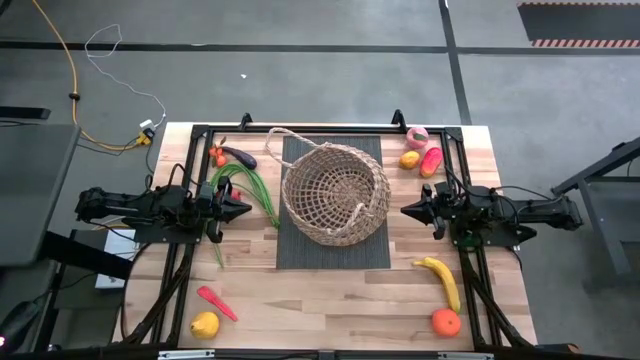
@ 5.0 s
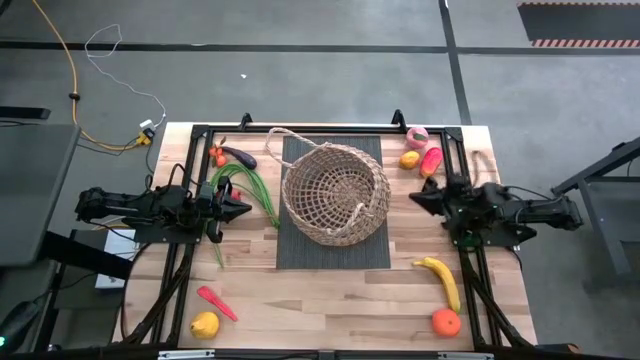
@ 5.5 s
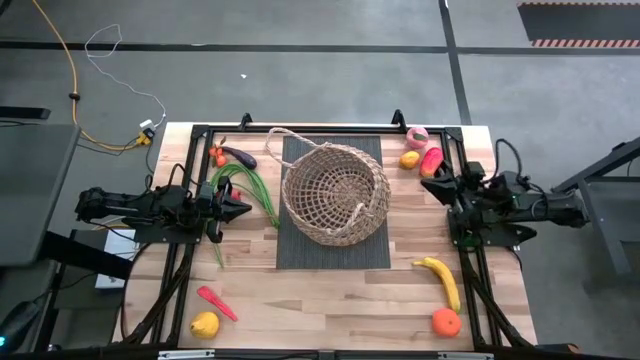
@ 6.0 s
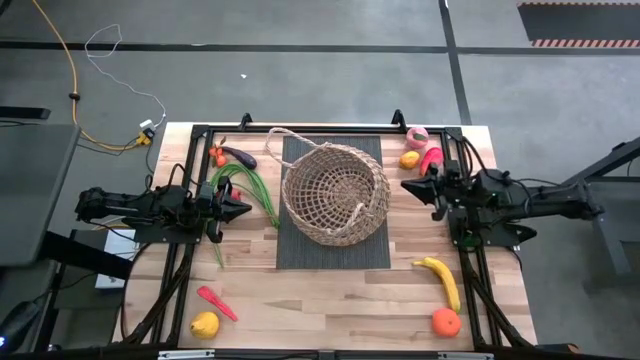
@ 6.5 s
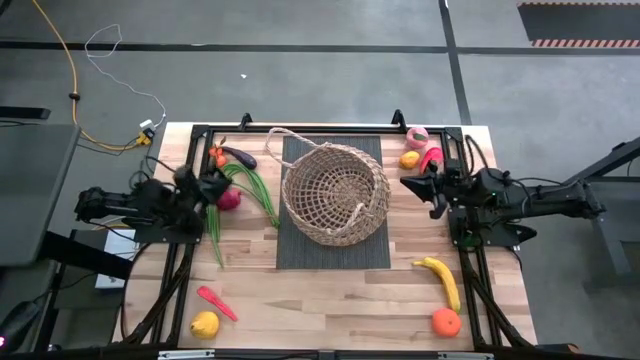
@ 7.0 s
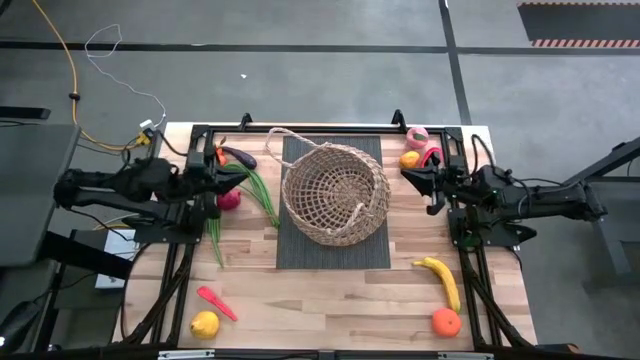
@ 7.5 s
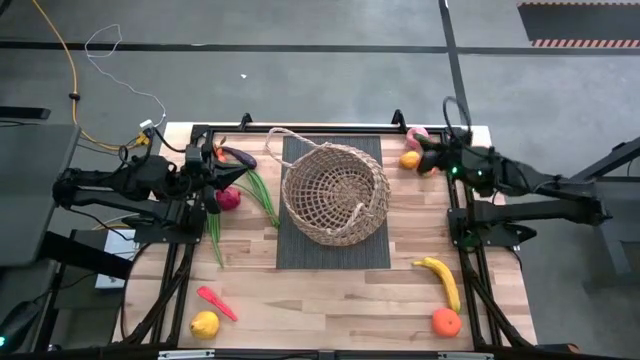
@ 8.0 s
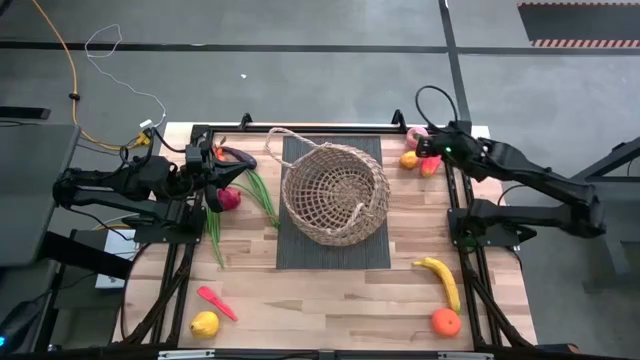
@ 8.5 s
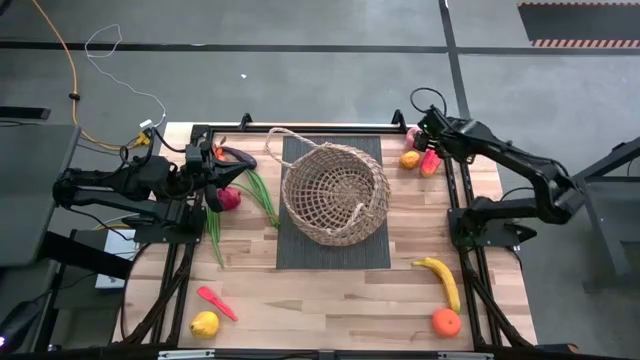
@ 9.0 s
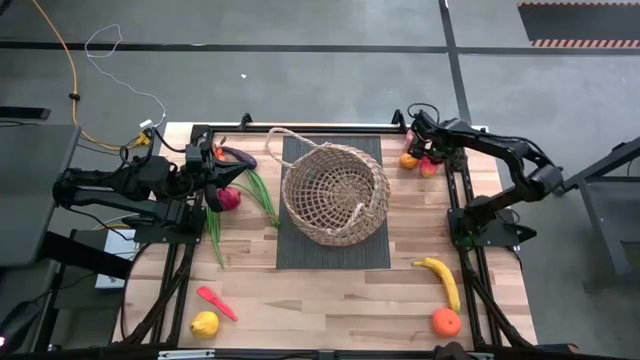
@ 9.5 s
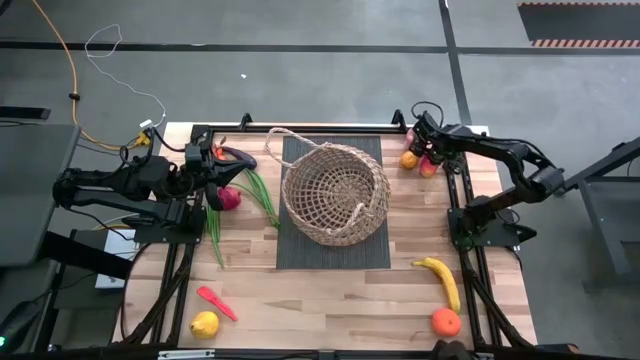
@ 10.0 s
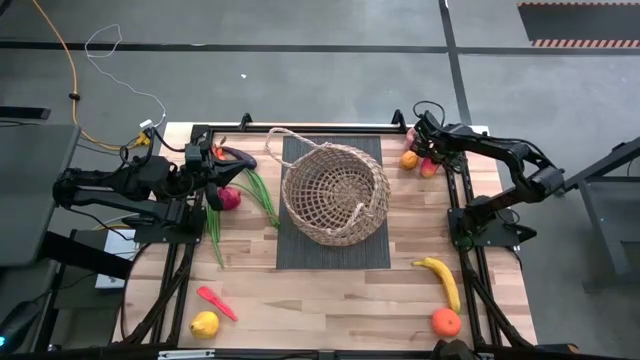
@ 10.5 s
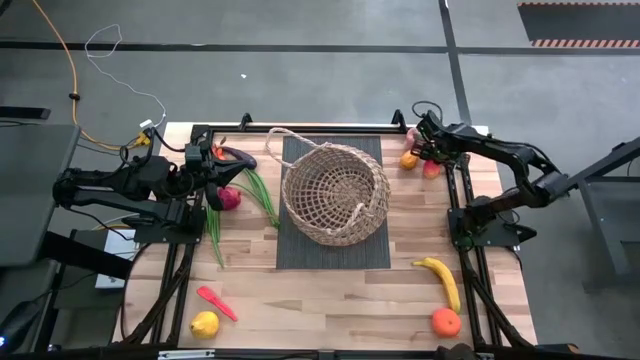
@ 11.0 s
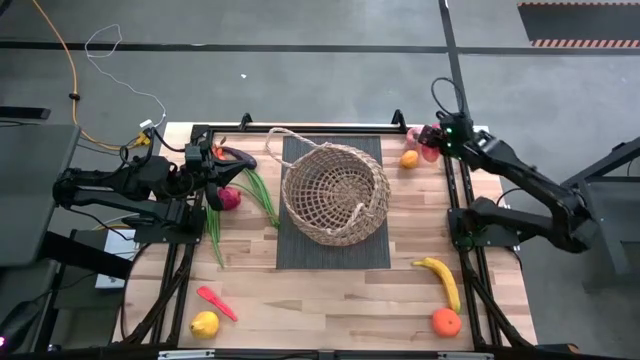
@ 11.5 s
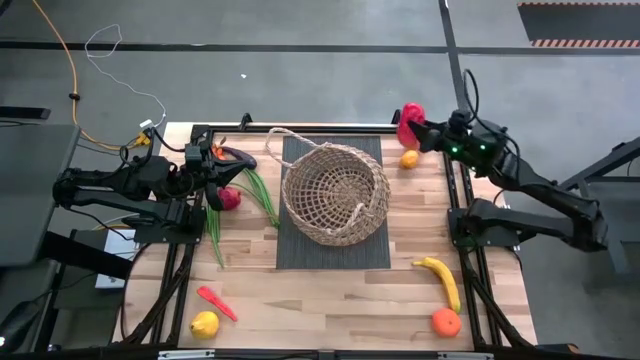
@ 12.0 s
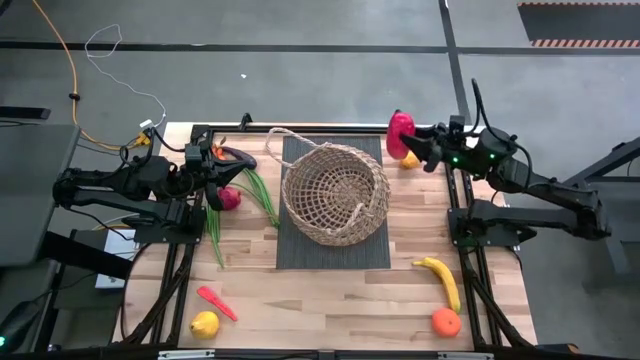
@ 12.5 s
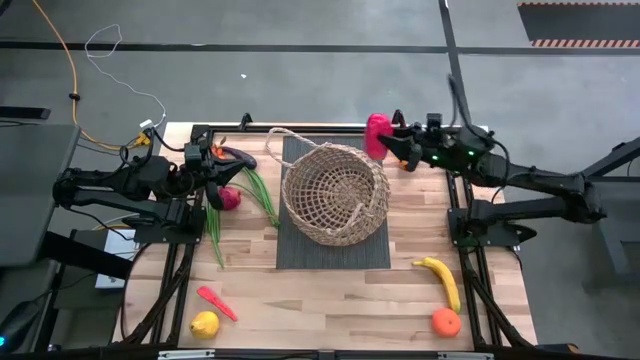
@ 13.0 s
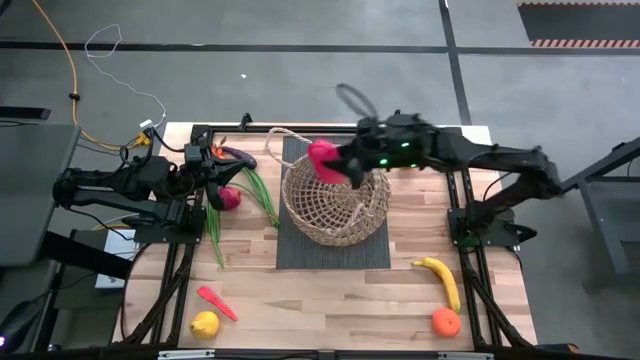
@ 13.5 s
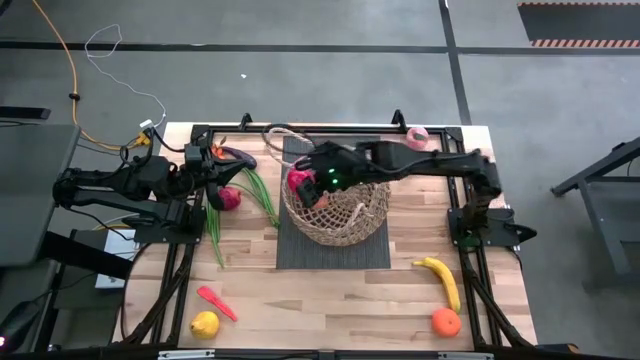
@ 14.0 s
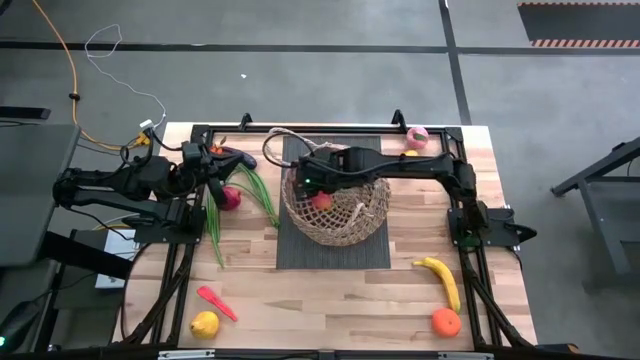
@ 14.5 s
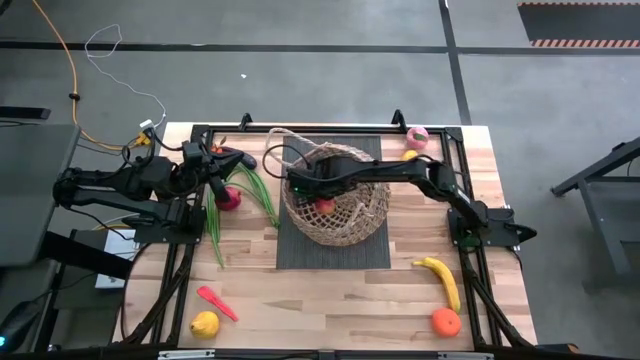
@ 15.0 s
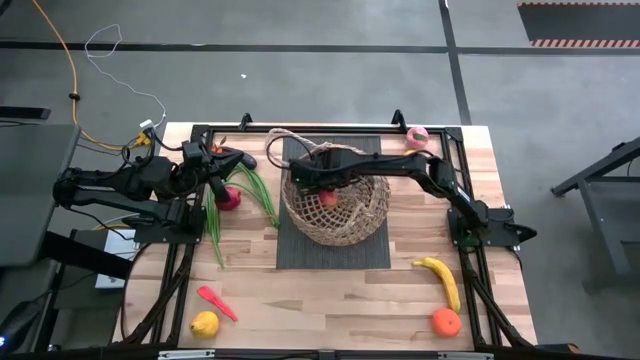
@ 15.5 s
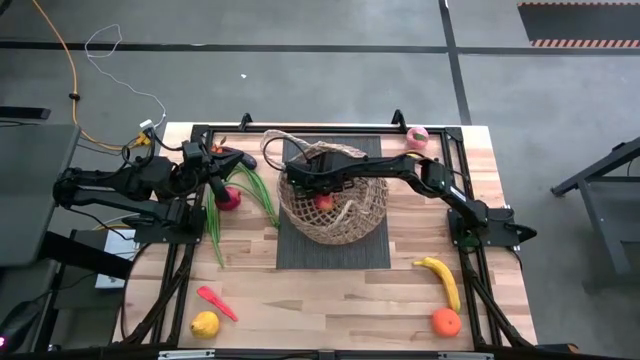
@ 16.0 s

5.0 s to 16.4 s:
Task: Build produce basket
Put the mango into the woven basket

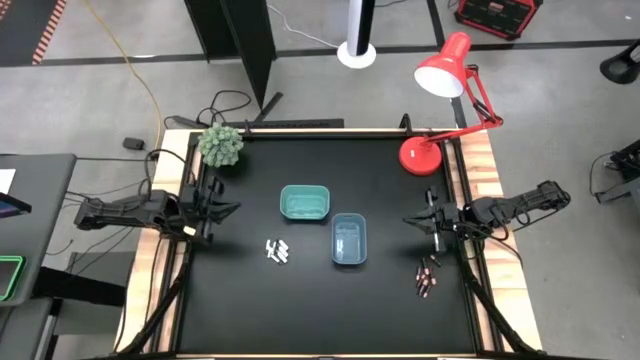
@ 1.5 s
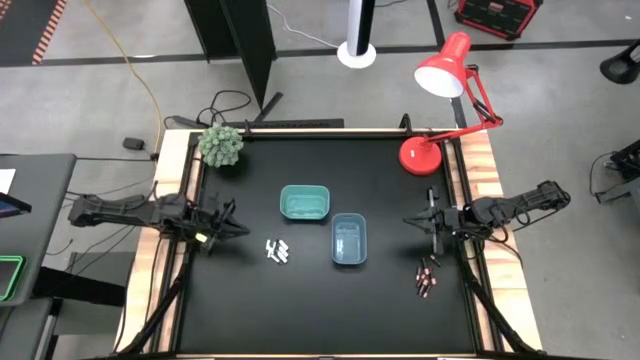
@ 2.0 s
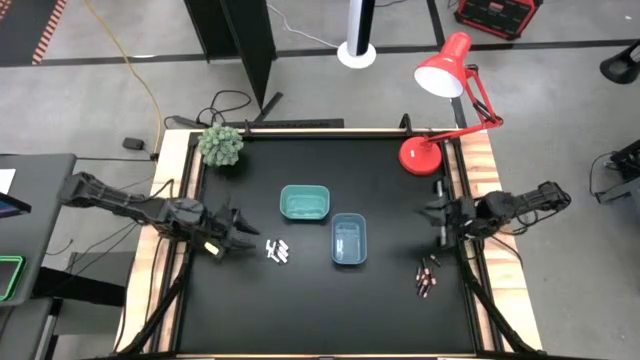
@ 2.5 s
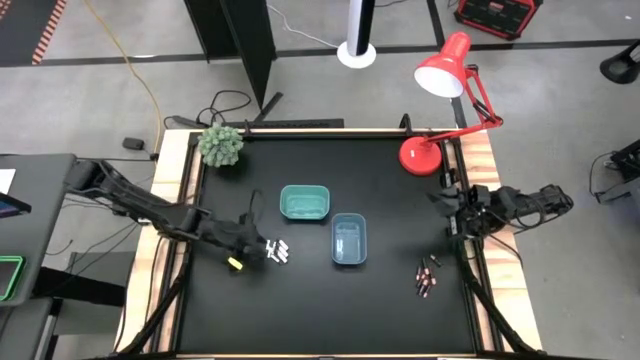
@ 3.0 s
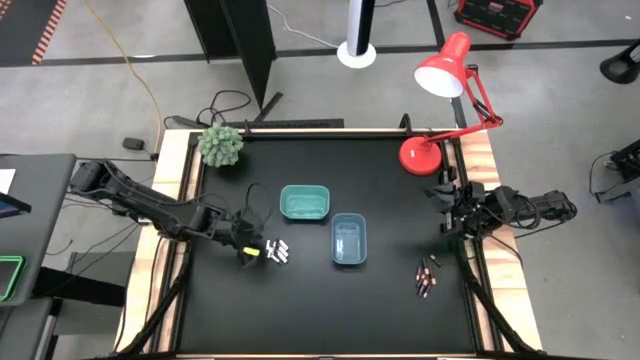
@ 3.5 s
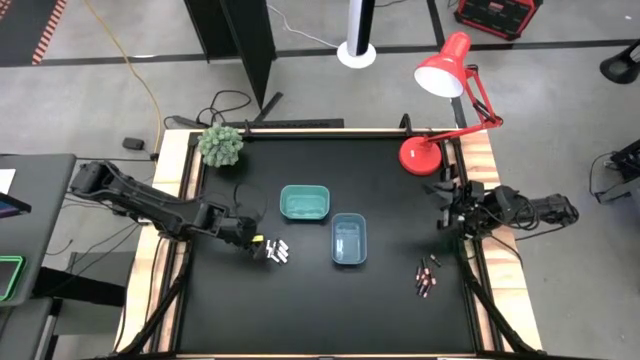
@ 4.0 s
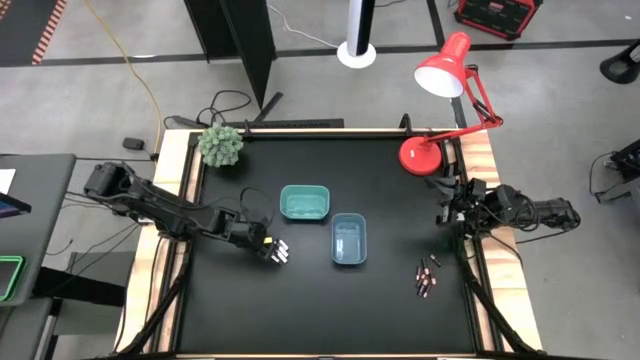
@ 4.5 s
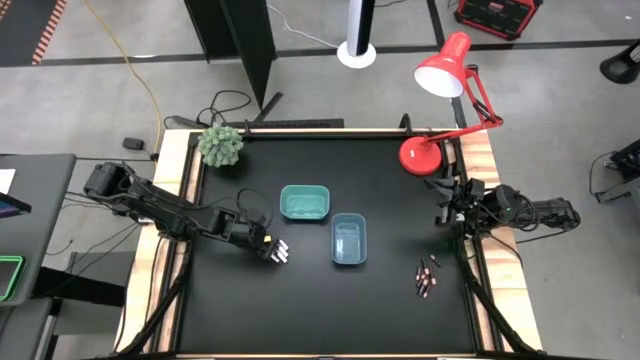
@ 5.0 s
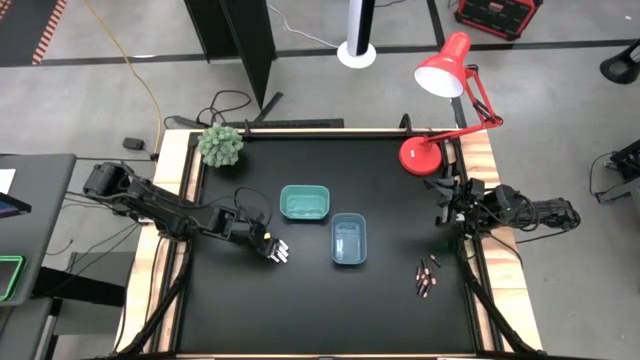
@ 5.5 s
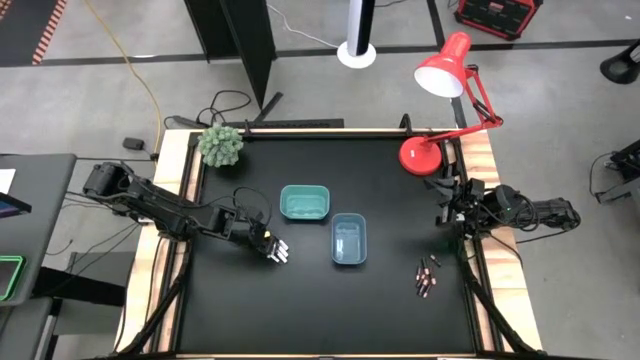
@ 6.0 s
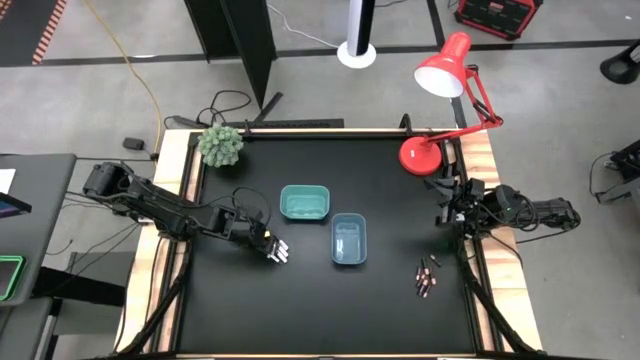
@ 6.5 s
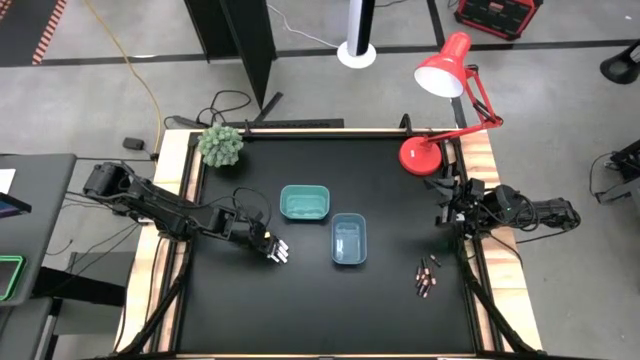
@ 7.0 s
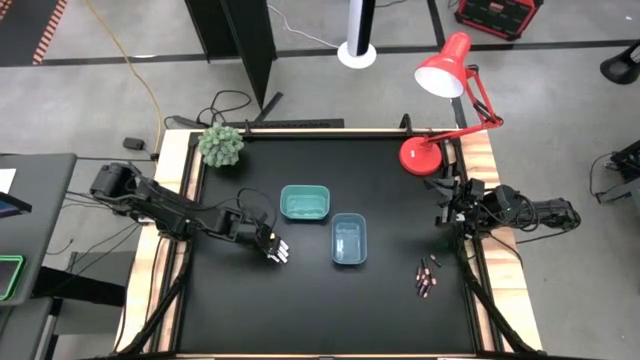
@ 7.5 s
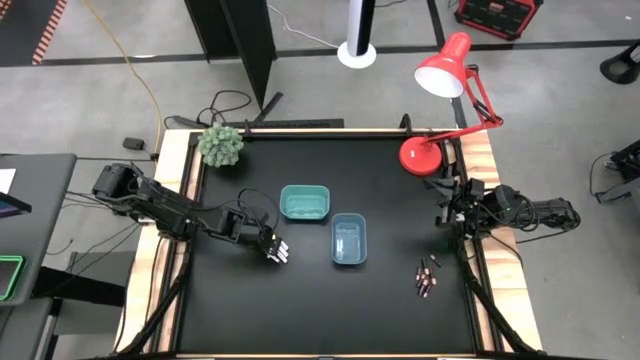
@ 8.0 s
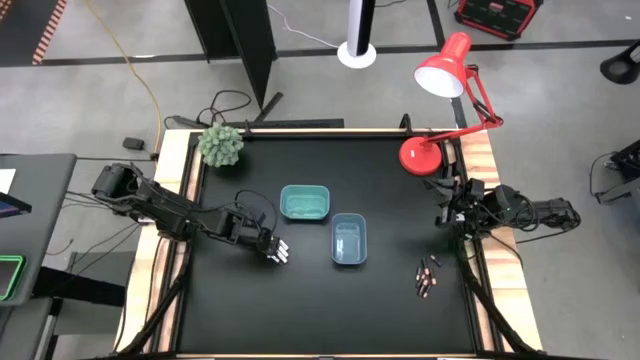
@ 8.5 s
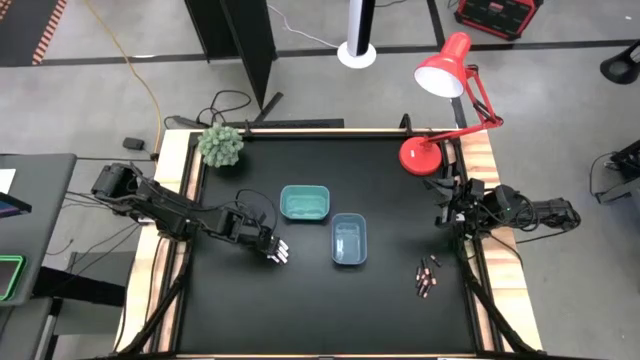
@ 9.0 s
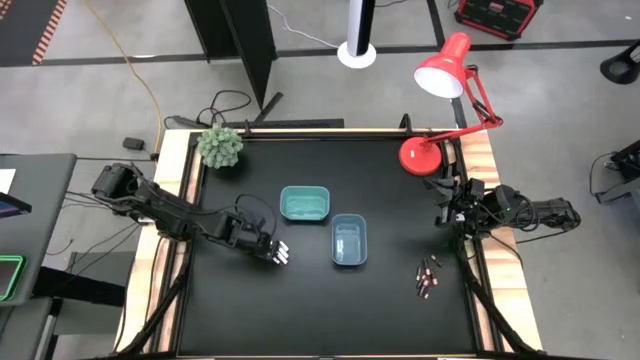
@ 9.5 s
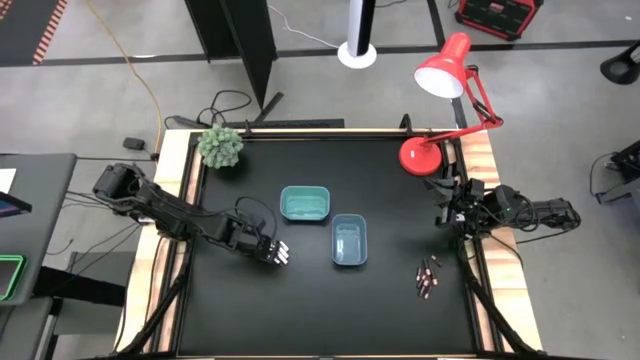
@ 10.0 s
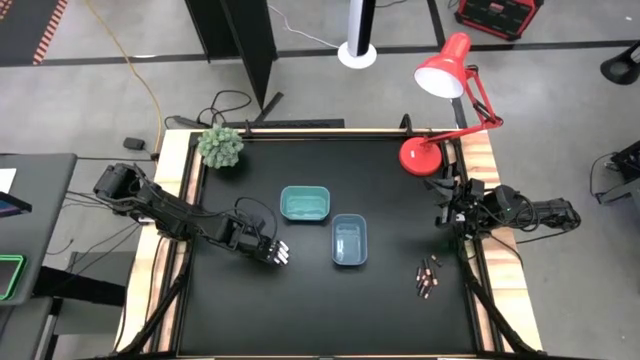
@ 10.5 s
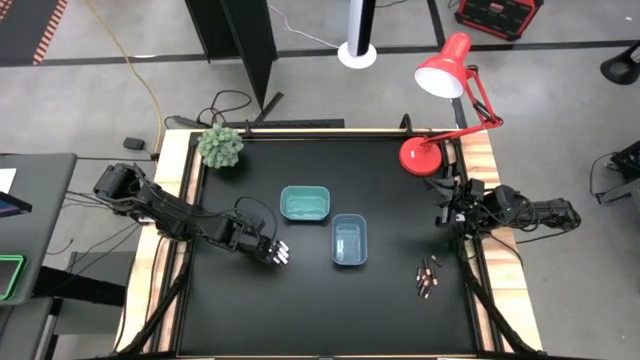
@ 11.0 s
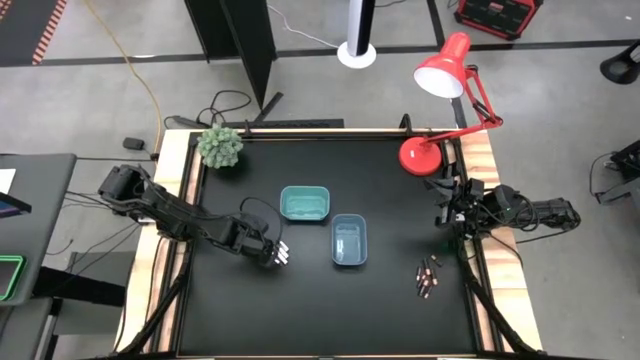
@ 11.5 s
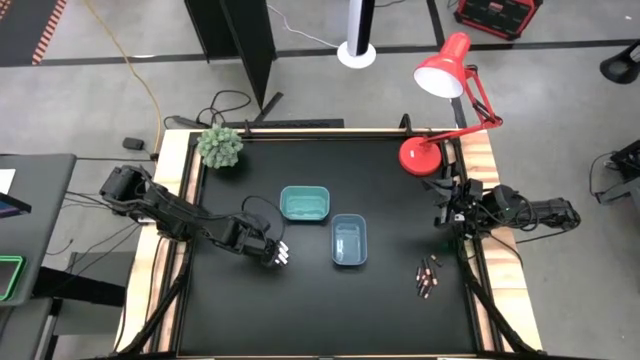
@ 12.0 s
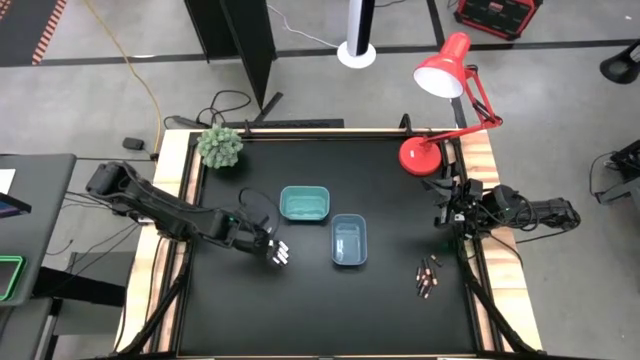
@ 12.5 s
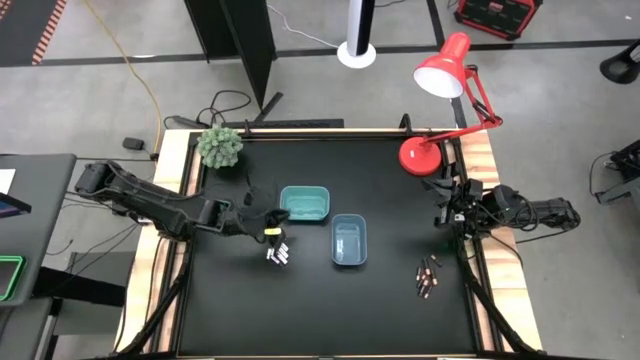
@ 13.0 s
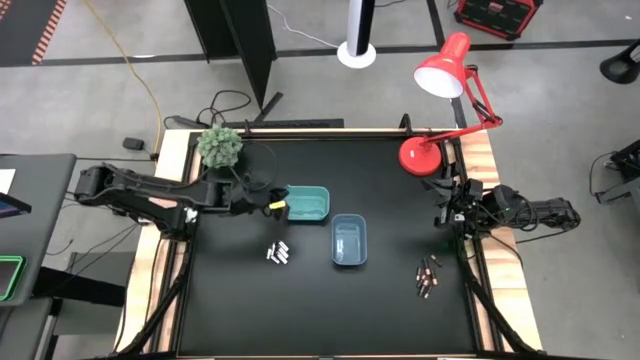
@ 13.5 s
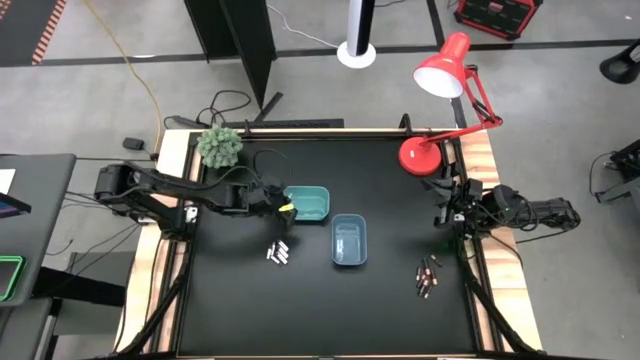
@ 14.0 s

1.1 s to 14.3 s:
Task: Sort batteries
Put the silver battery into the light blue bin
